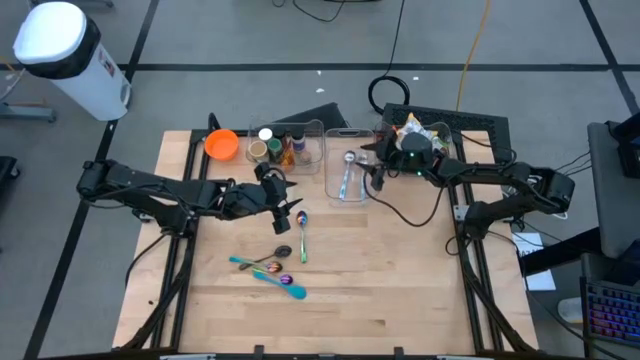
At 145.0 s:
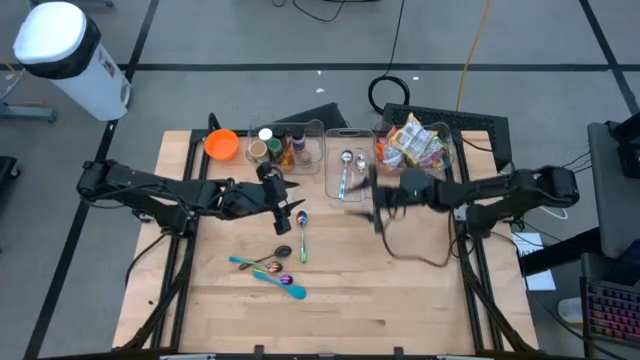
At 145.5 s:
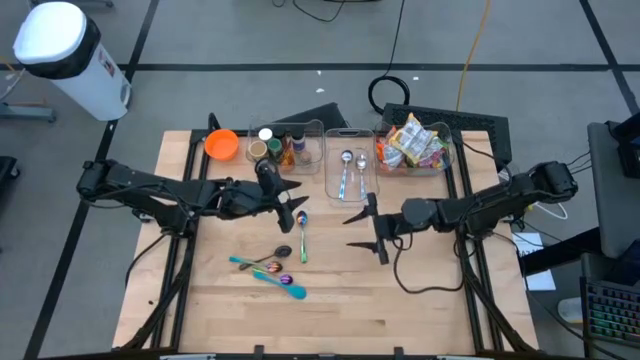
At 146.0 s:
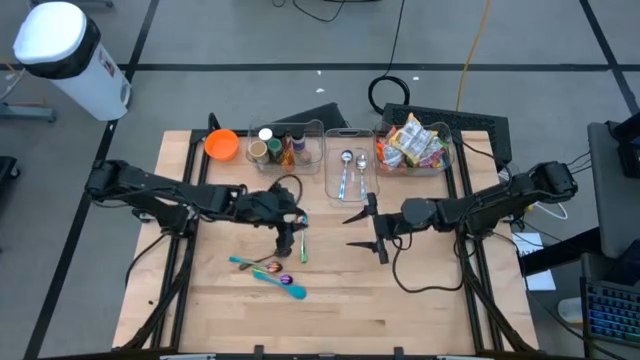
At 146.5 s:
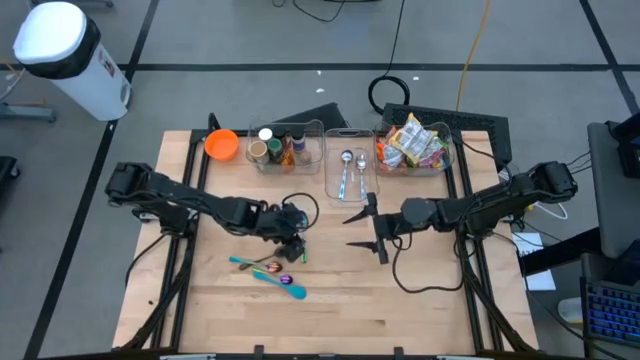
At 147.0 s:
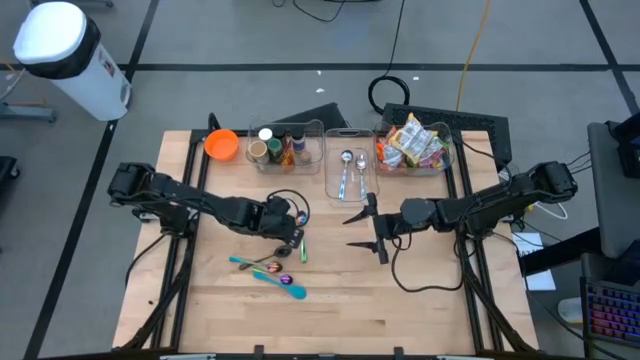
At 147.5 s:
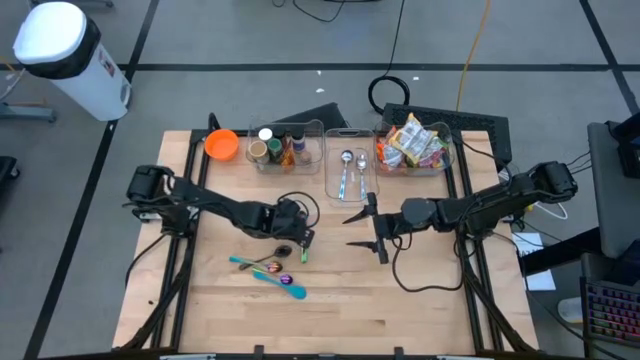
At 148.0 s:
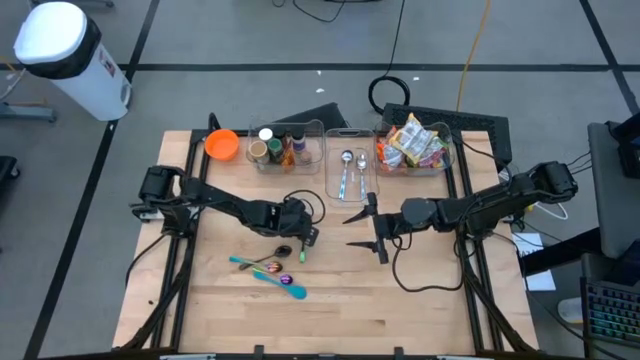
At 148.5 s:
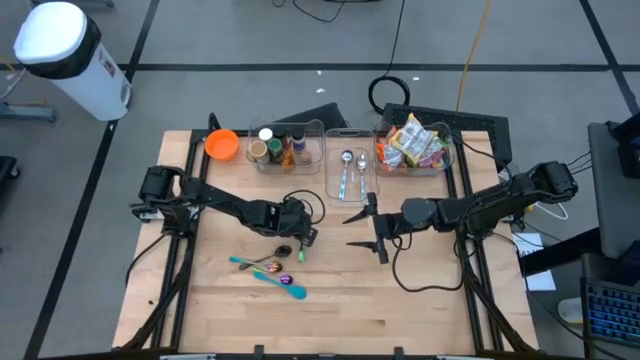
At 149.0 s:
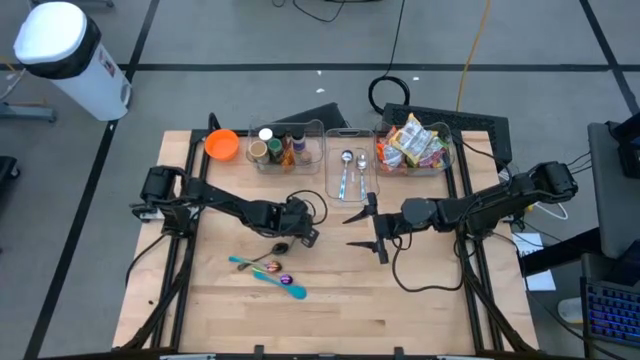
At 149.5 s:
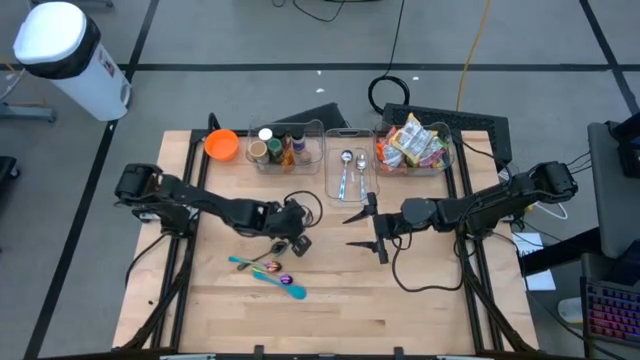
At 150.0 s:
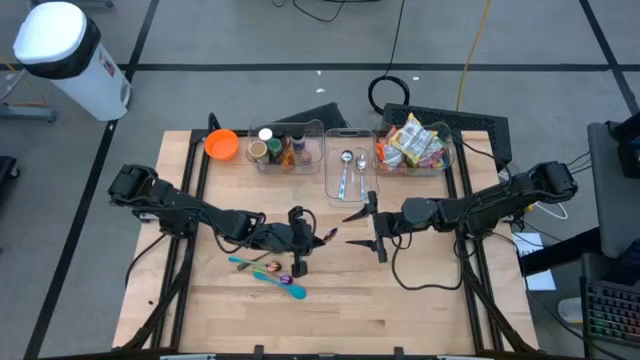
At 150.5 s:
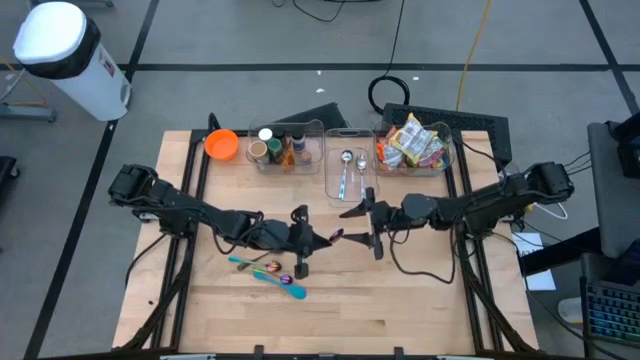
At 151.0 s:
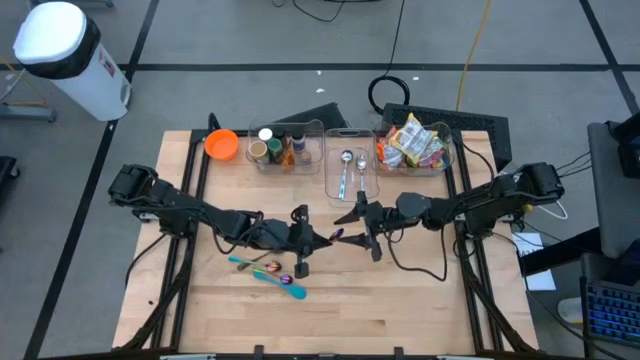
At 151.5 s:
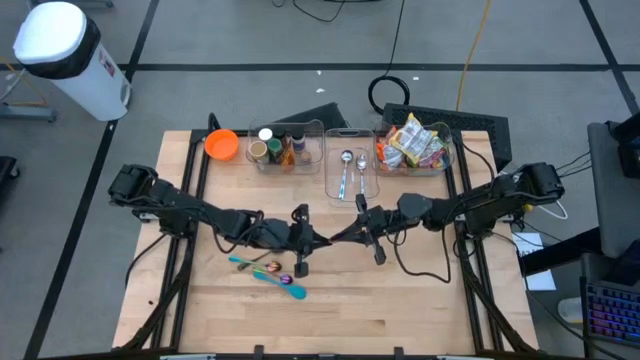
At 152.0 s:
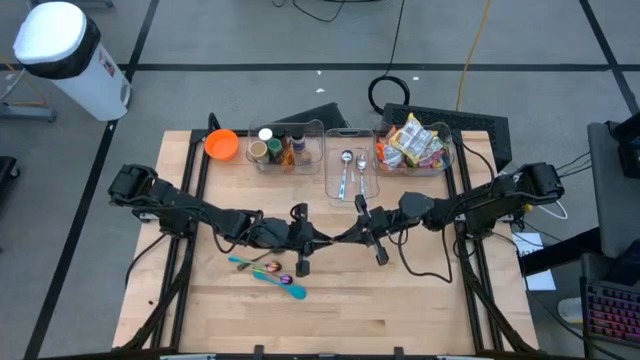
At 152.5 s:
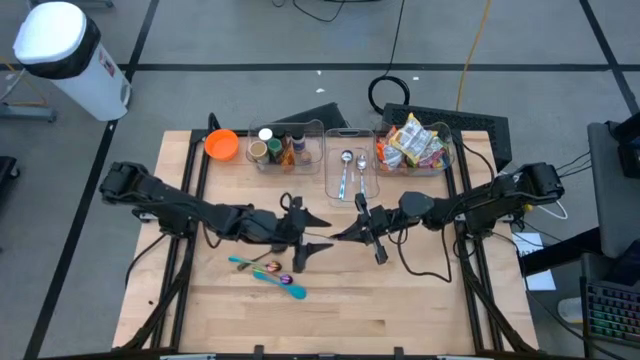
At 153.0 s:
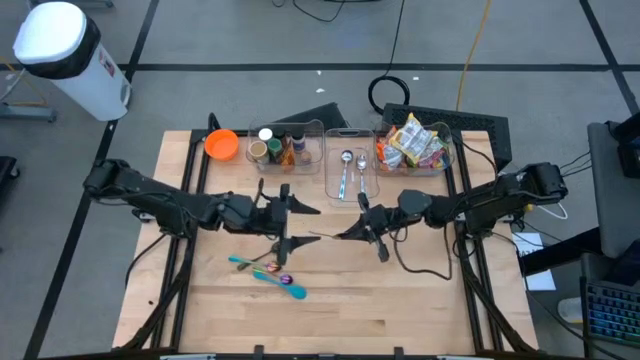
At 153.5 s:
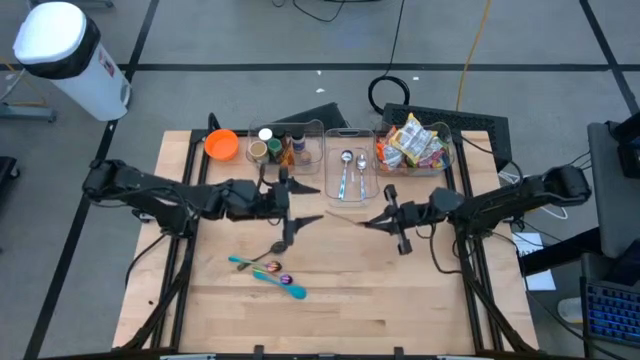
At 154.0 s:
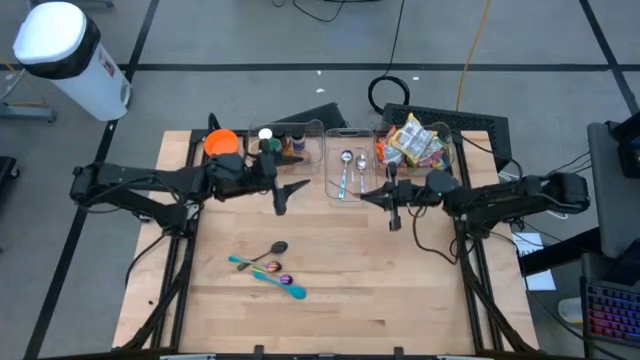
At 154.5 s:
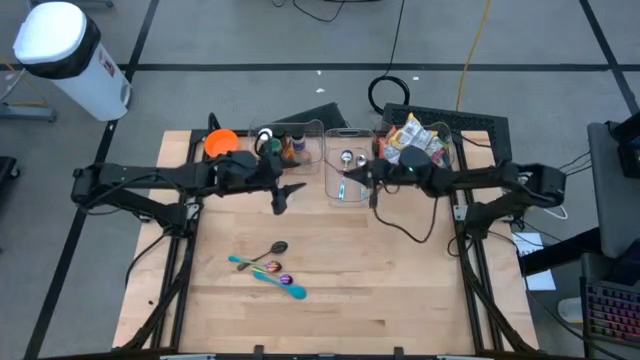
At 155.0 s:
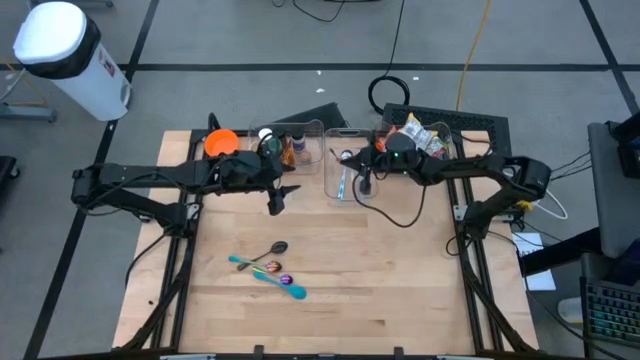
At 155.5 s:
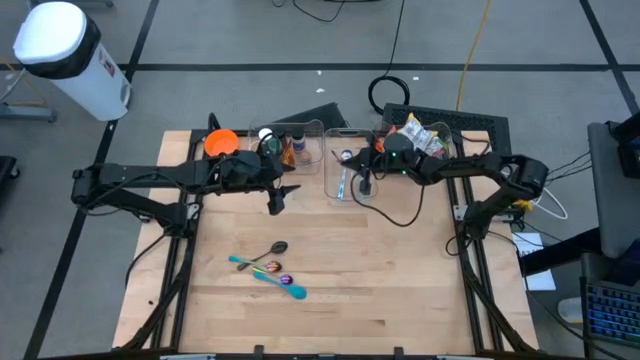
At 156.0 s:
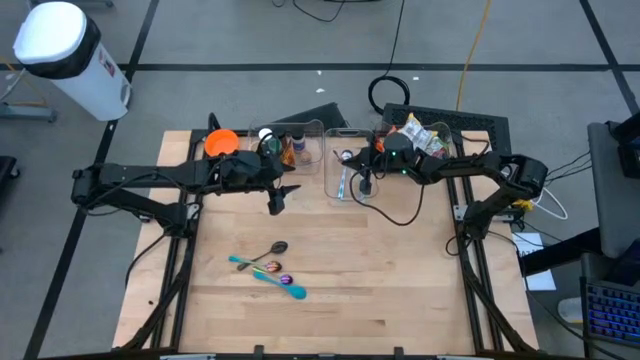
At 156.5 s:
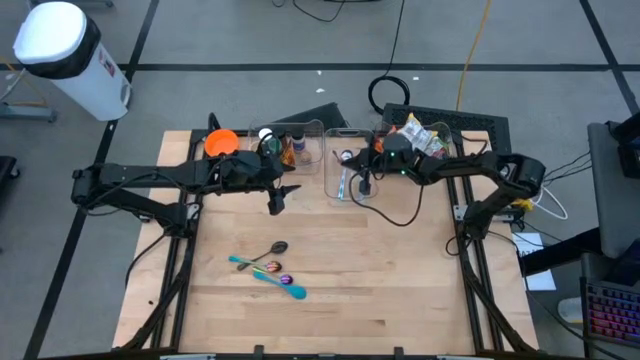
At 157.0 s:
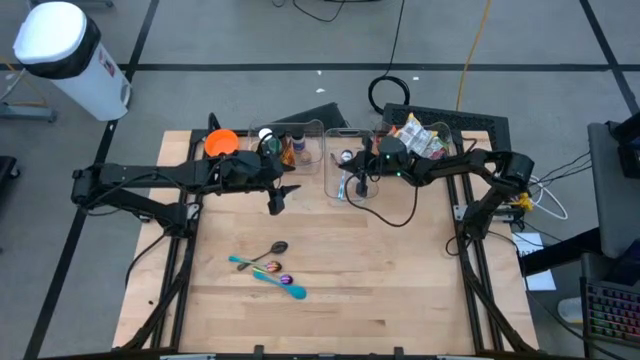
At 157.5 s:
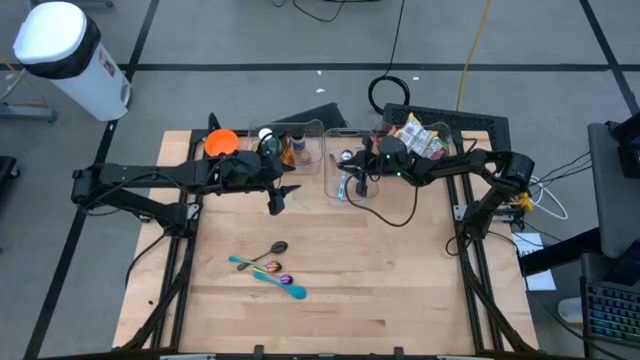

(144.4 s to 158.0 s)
Task: Pick & Place Food Item
Put the top purple spoon into the center transparent bin

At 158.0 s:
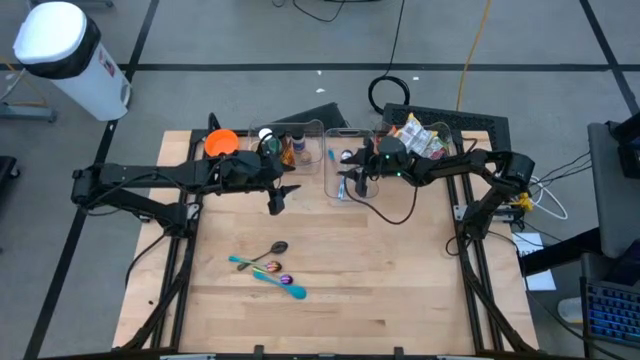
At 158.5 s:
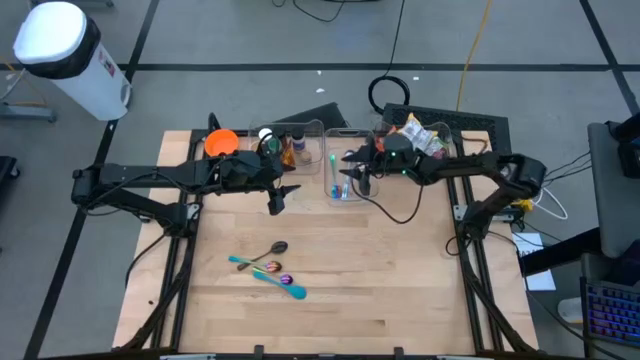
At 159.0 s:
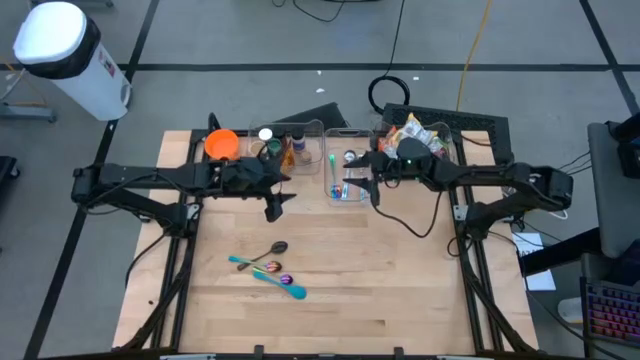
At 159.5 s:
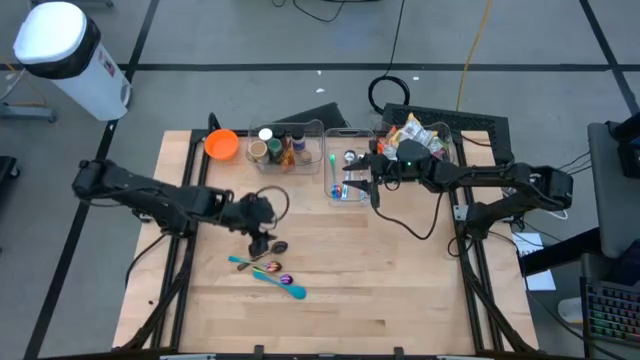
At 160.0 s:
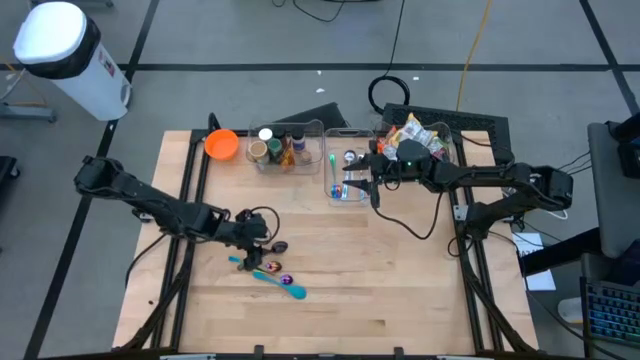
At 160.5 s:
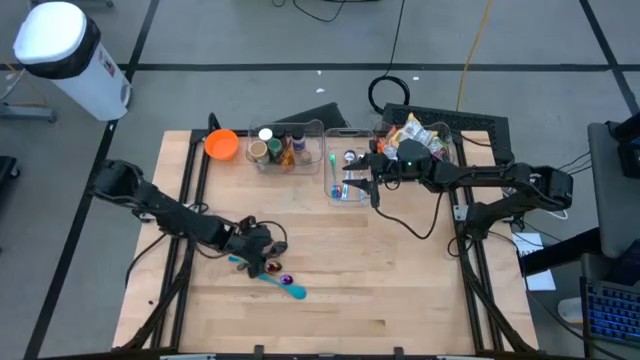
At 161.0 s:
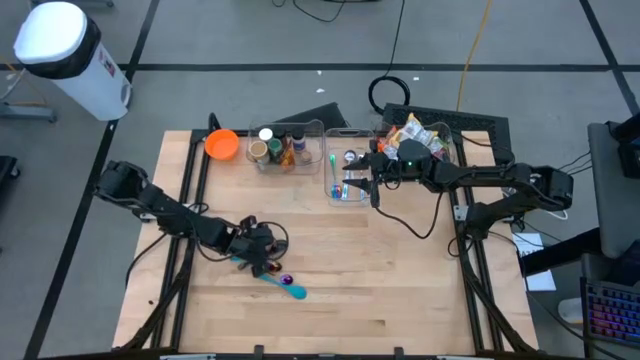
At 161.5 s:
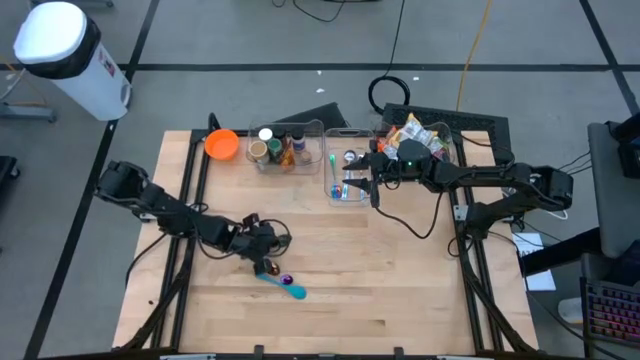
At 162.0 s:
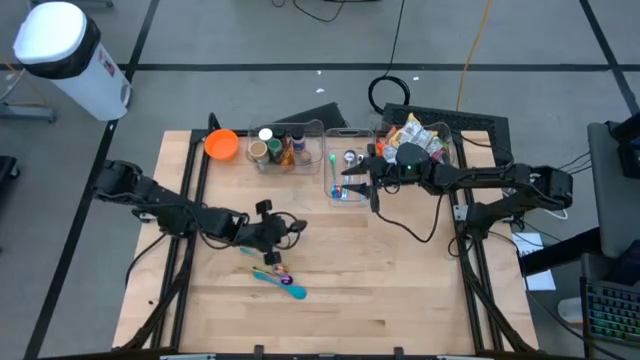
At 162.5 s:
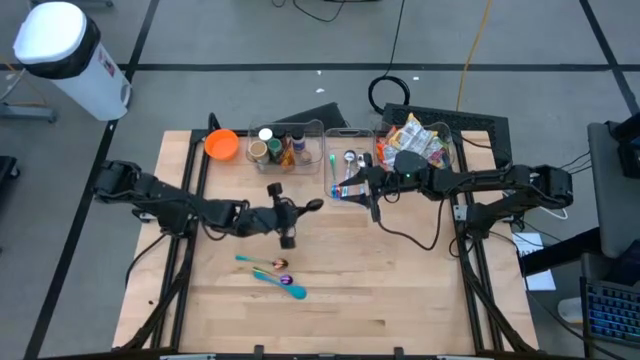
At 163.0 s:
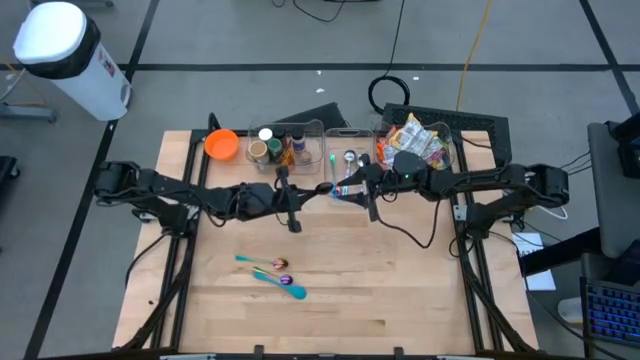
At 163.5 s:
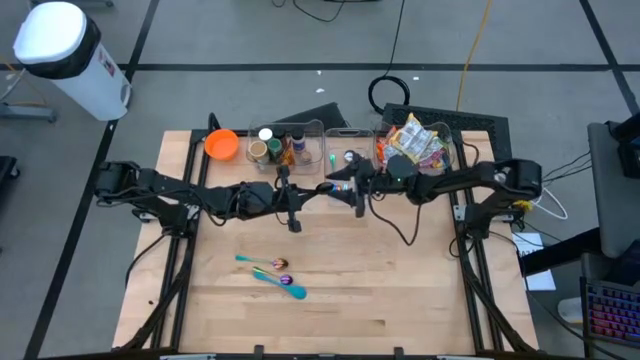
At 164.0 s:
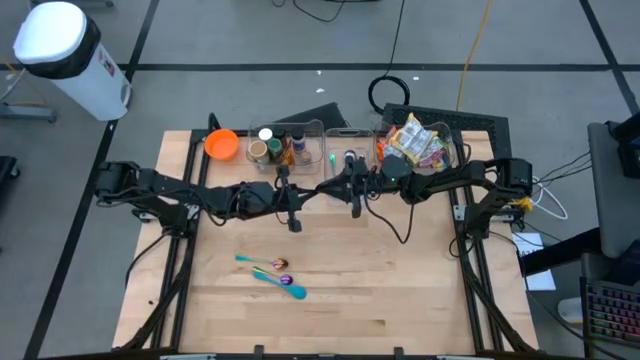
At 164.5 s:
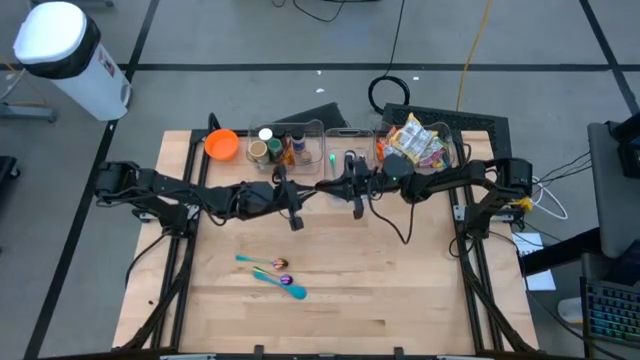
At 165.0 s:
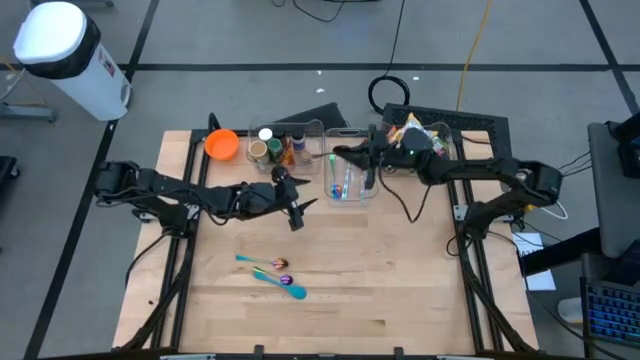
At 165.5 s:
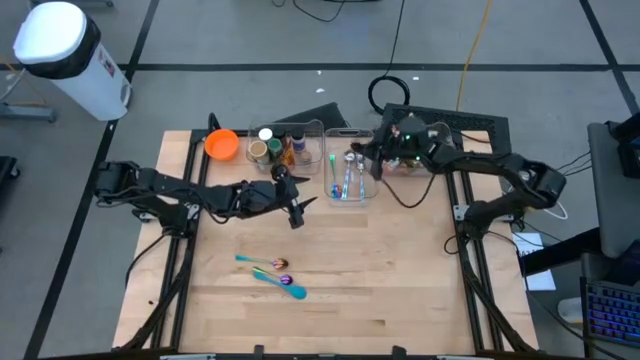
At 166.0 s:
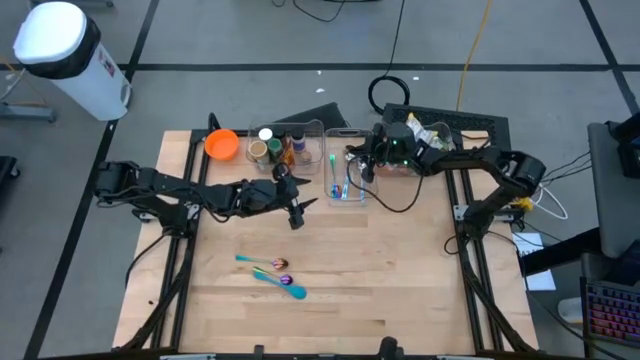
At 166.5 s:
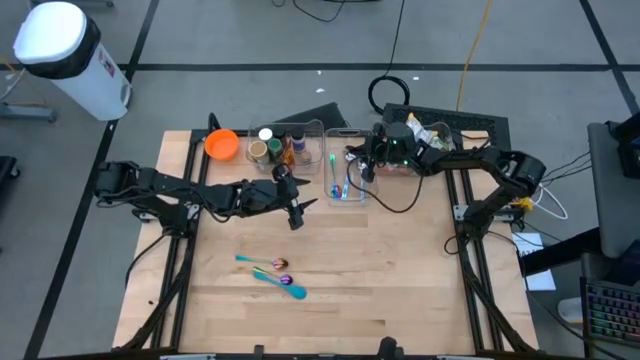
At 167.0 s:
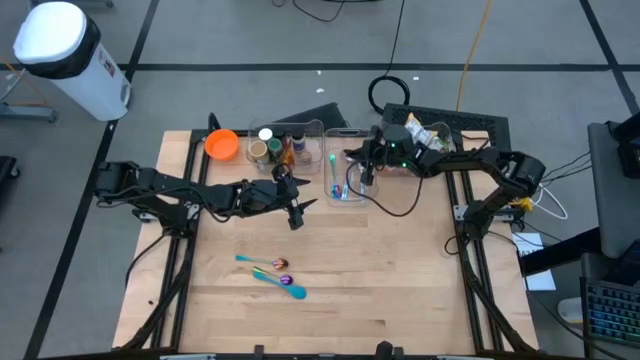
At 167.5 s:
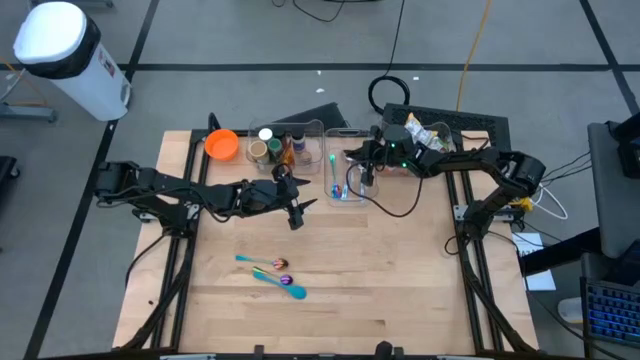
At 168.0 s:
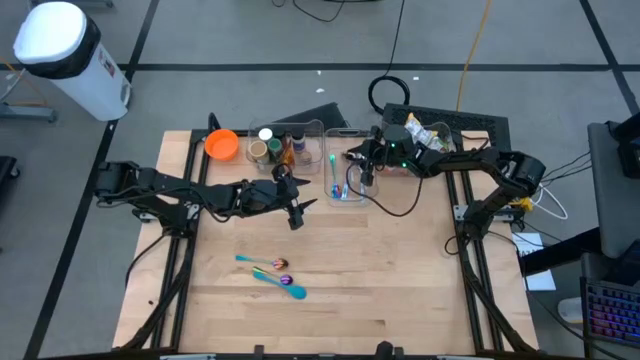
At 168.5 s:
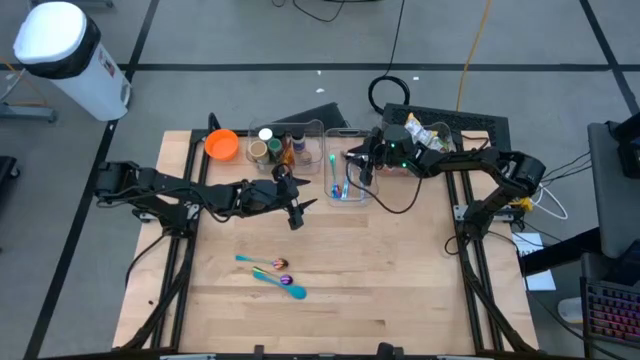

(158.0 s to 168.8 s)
Put the black spoon into the center transparent bin
